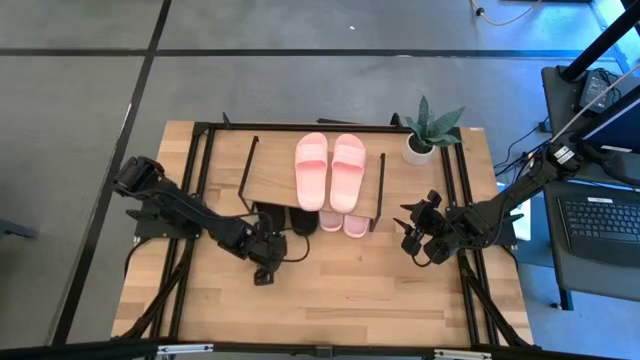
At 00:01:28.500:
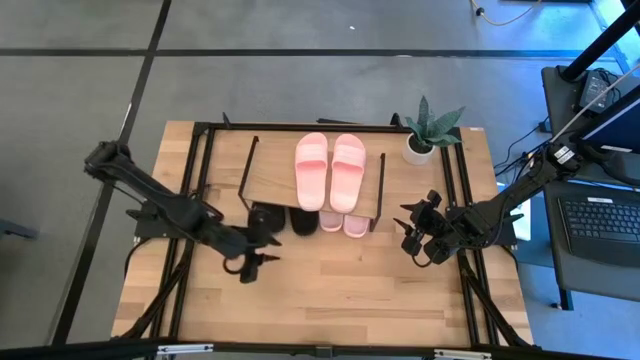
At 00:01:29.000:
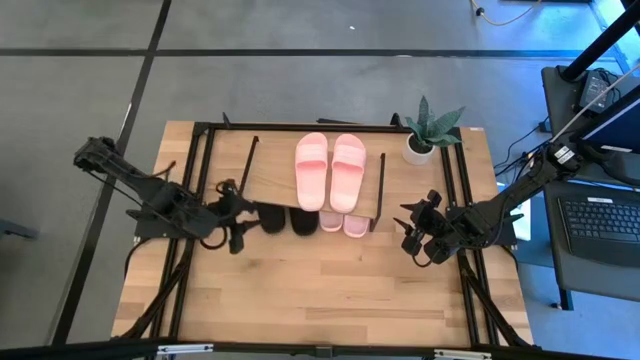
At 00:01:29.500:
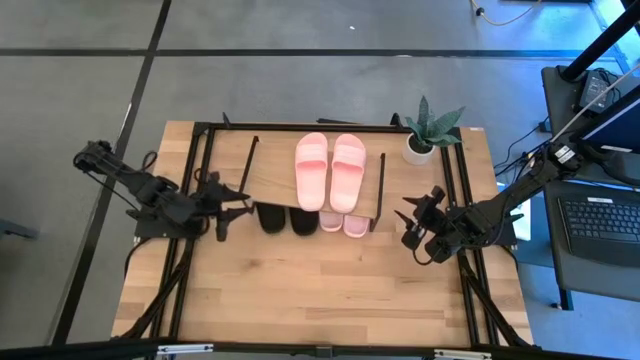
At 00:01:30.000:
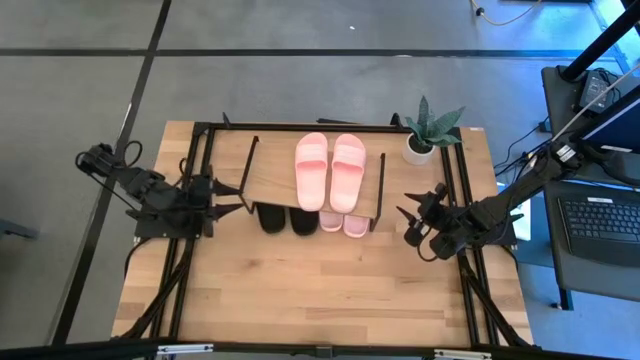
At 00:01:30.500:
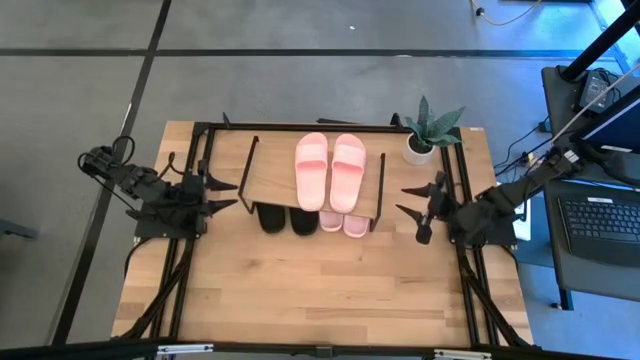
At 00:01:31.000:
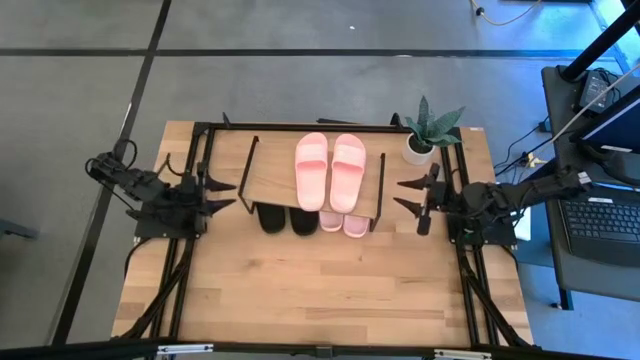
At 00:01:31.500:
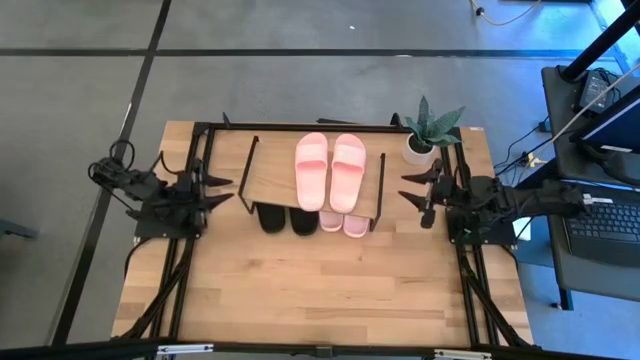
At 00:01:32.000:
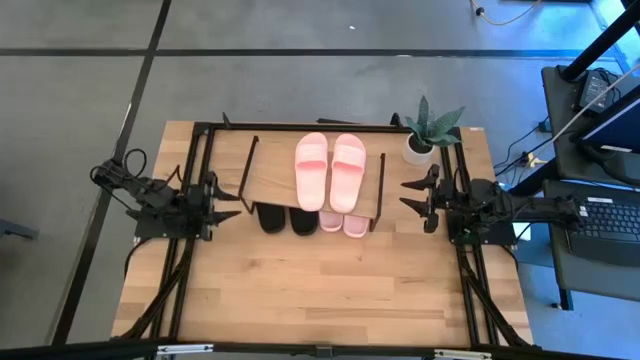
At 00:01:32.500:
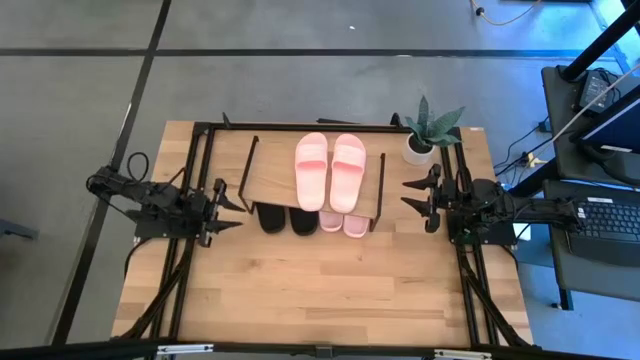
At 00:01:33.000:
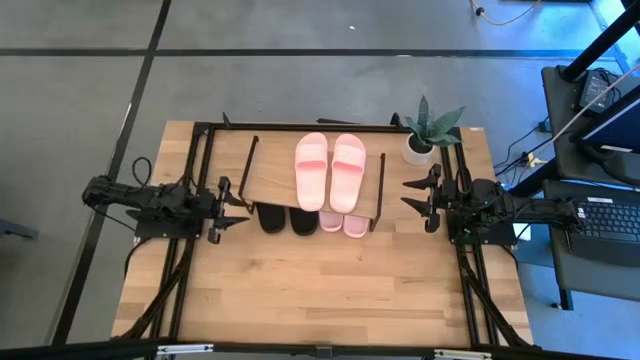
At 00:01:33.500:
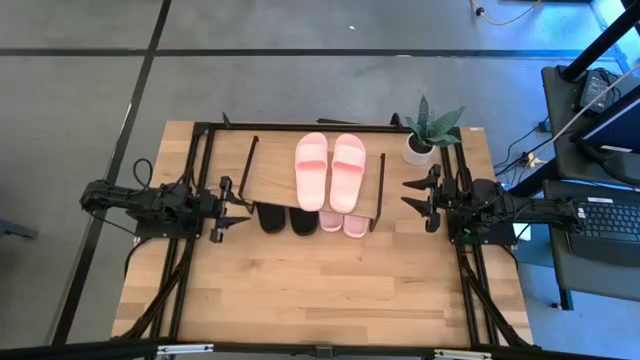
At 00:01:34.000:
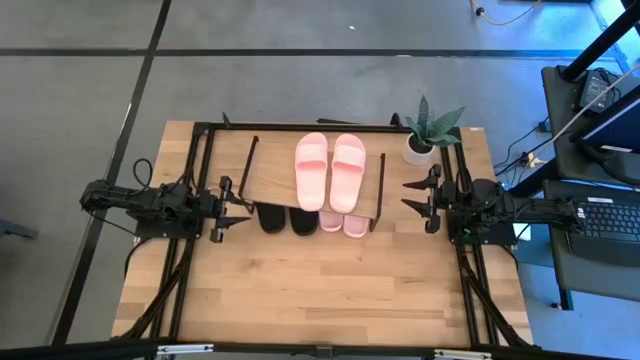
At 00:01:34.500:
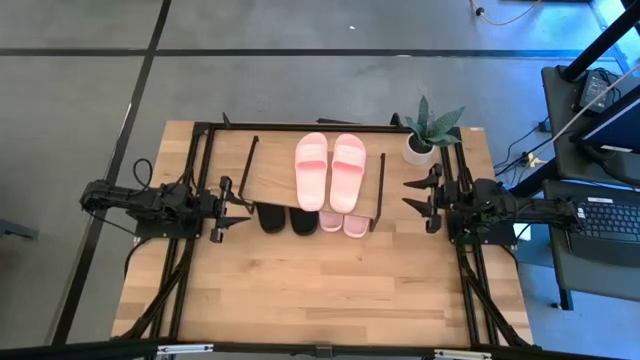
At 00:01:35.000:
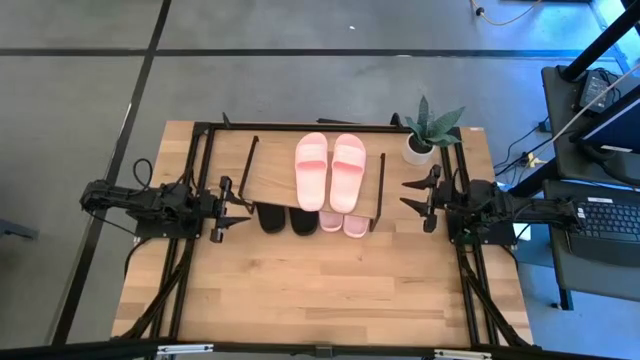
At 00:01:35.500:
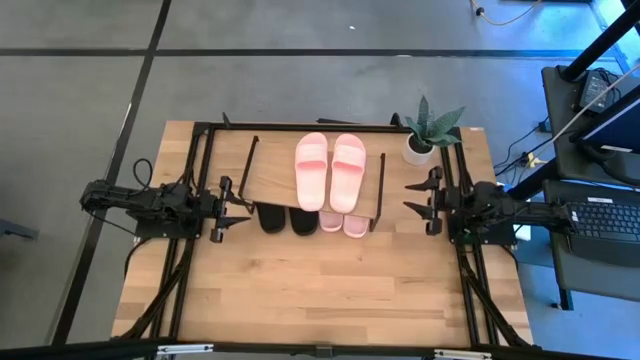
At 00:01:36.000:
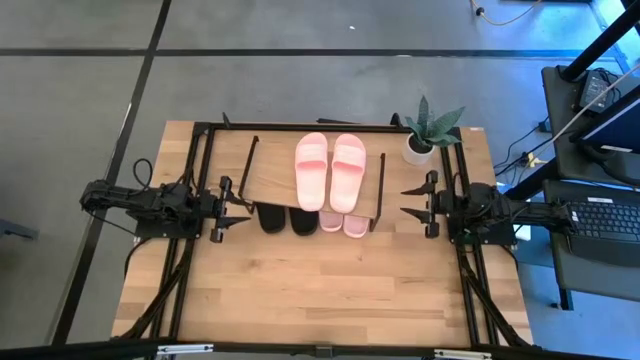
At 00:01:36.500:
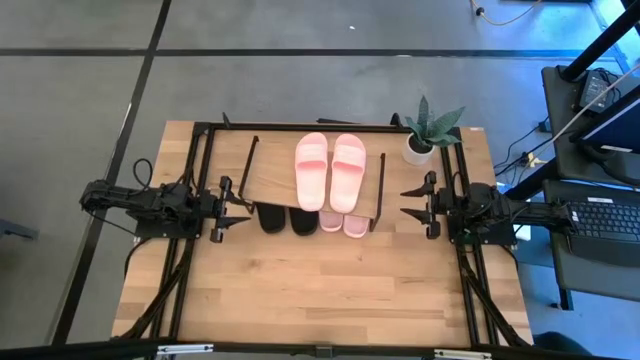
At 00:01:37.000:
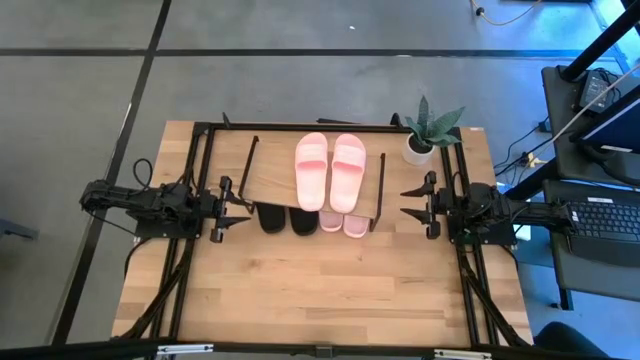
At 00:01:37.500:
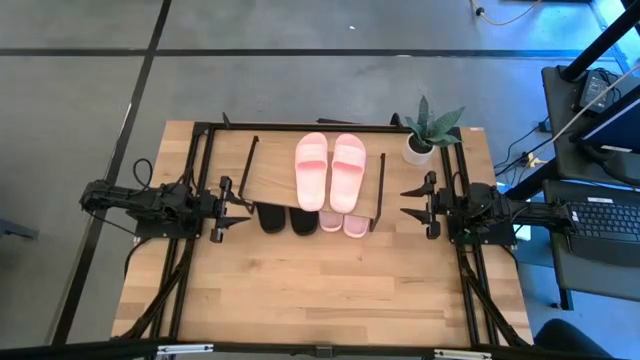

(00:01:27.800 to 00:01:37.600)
Task: Pick and place slides into the shelf
Return to Home Position
